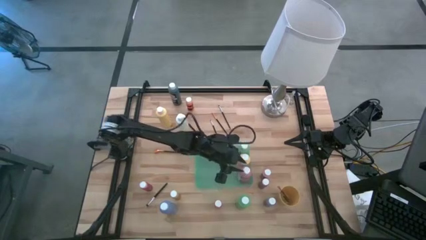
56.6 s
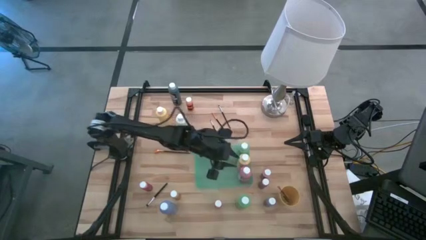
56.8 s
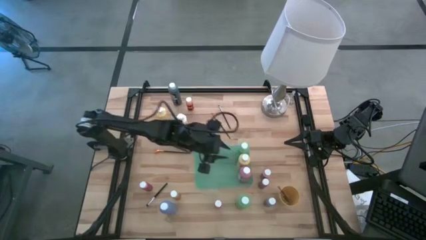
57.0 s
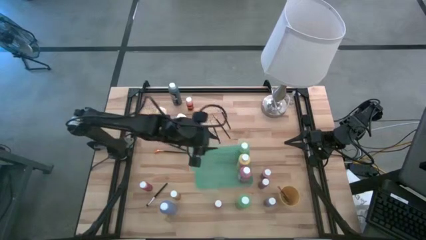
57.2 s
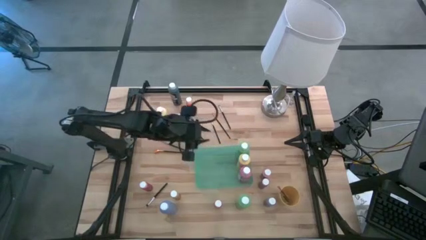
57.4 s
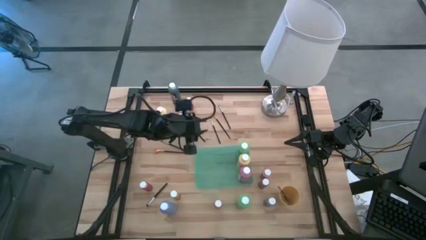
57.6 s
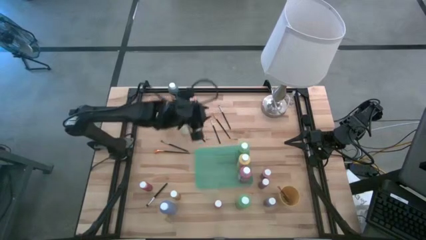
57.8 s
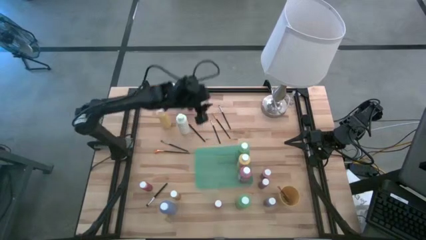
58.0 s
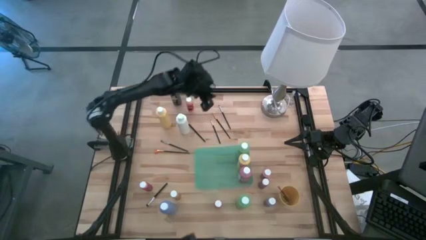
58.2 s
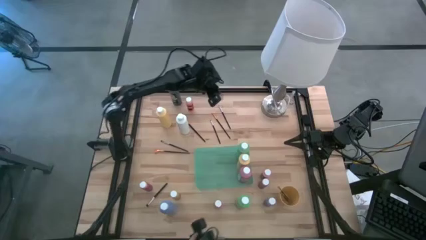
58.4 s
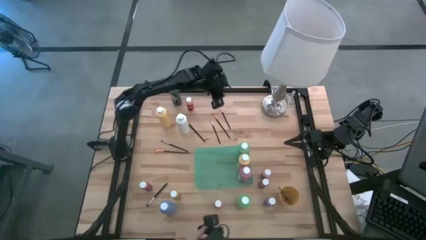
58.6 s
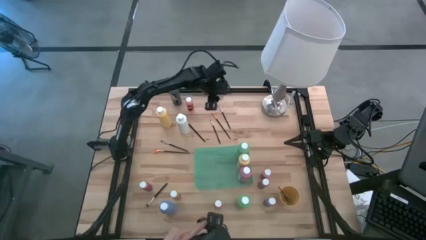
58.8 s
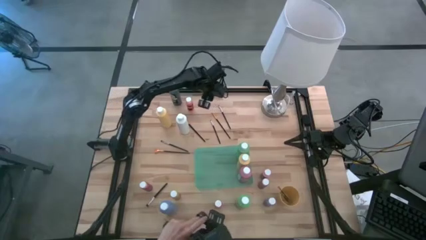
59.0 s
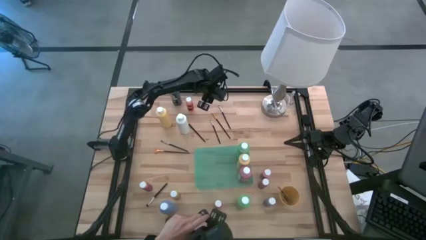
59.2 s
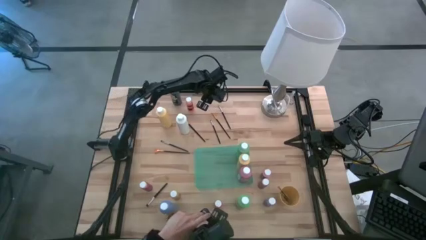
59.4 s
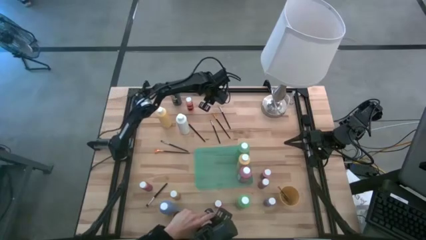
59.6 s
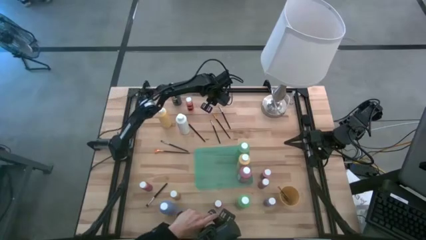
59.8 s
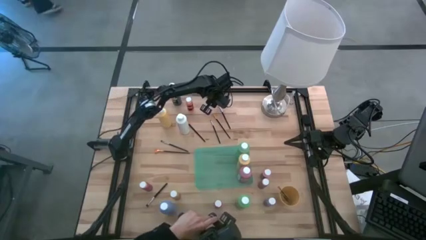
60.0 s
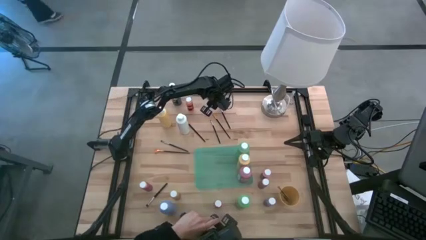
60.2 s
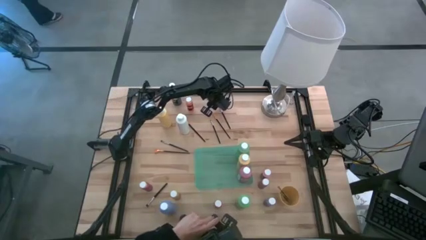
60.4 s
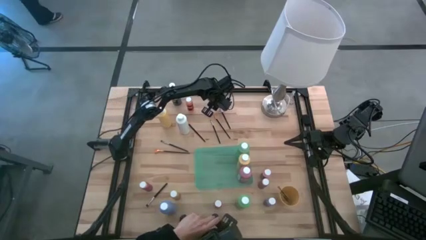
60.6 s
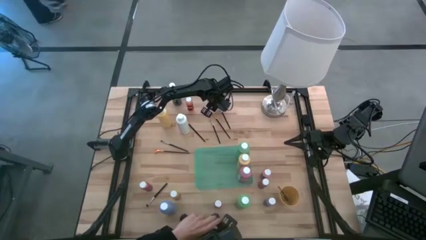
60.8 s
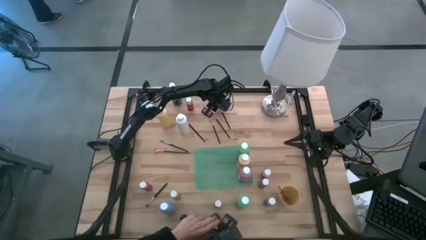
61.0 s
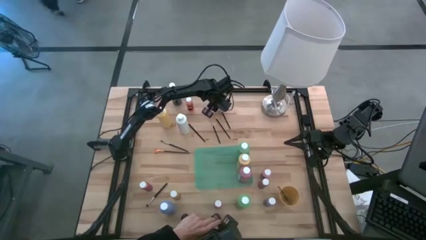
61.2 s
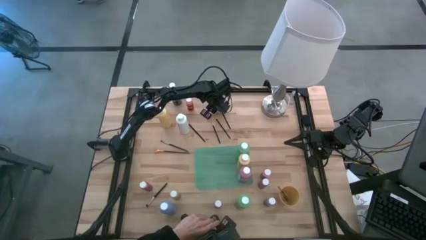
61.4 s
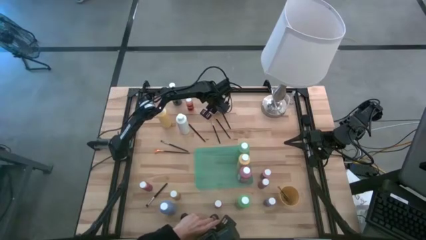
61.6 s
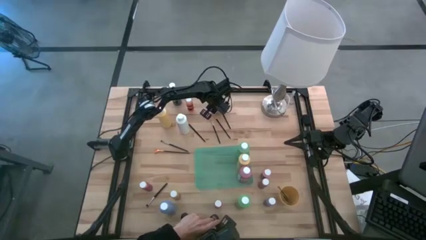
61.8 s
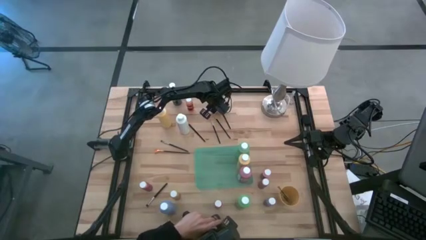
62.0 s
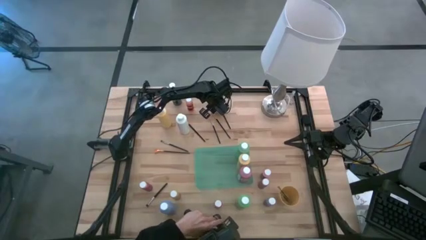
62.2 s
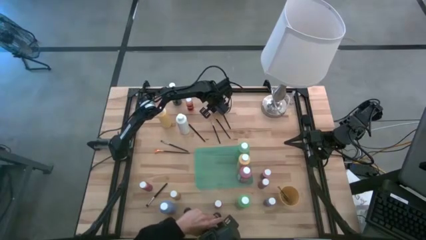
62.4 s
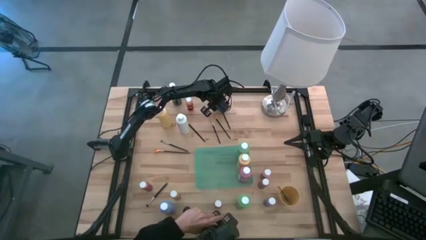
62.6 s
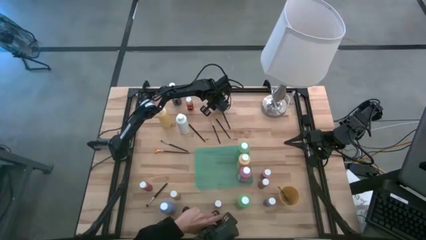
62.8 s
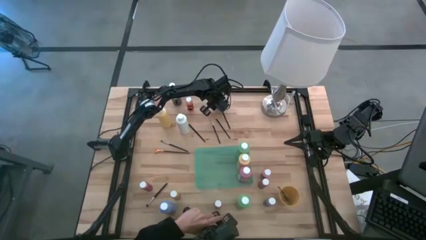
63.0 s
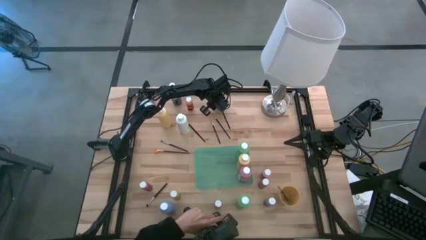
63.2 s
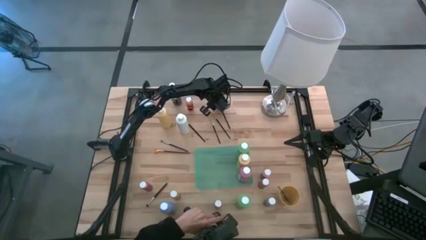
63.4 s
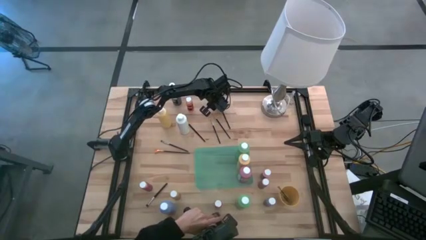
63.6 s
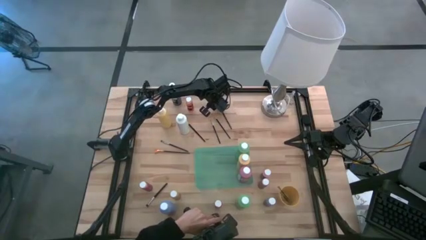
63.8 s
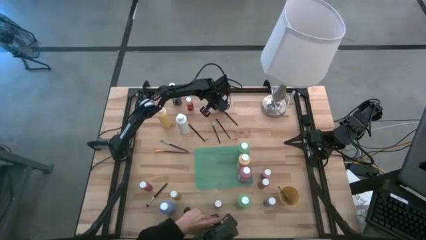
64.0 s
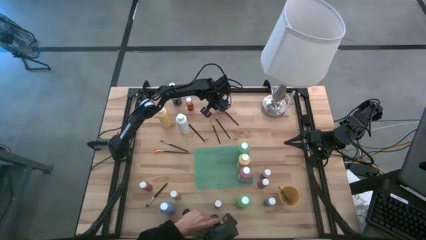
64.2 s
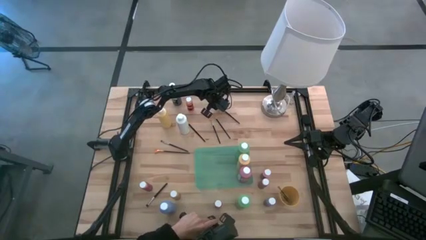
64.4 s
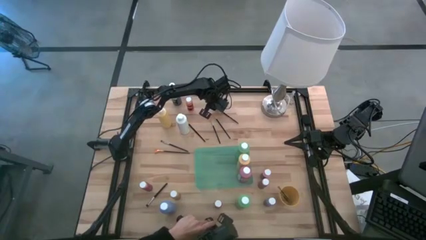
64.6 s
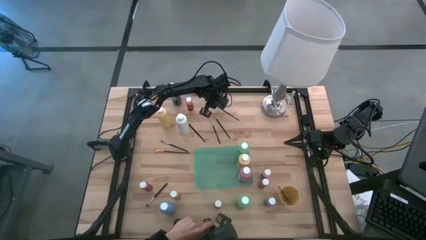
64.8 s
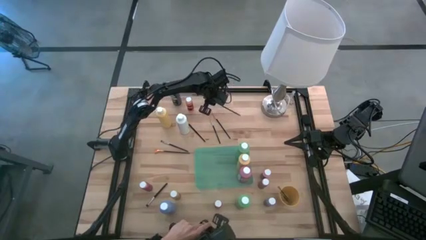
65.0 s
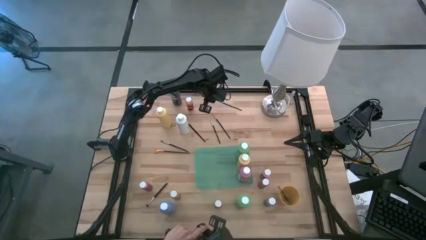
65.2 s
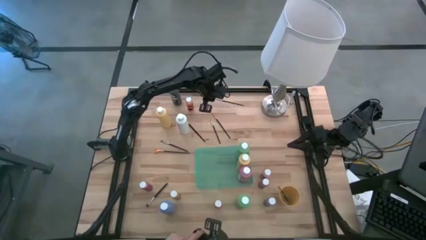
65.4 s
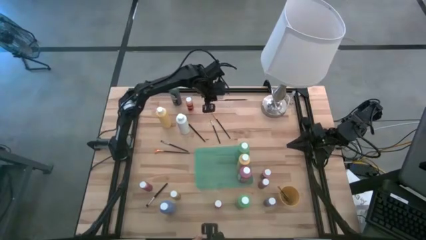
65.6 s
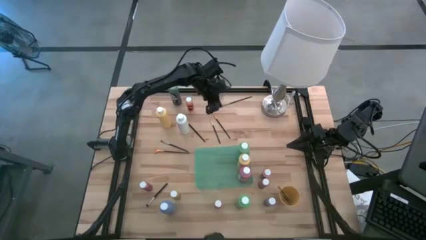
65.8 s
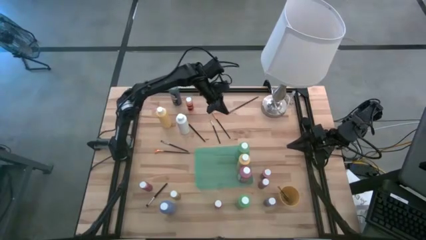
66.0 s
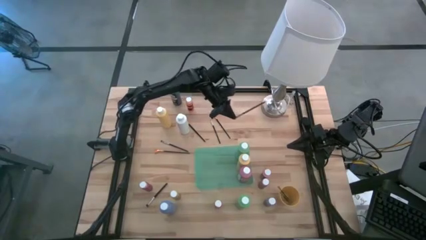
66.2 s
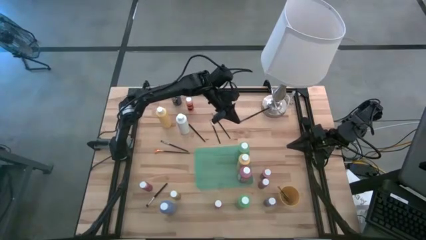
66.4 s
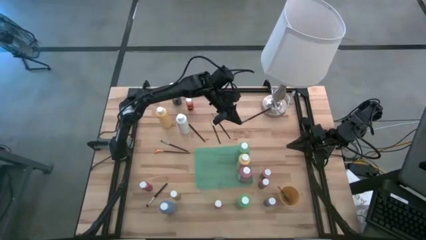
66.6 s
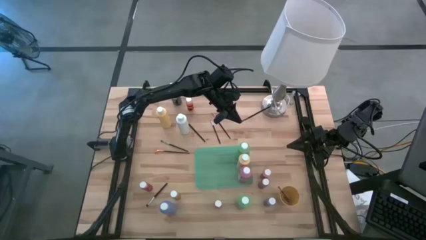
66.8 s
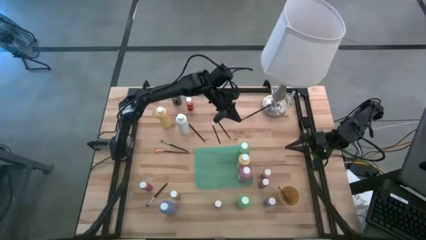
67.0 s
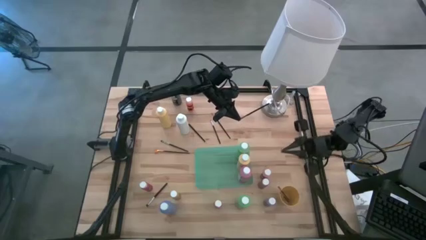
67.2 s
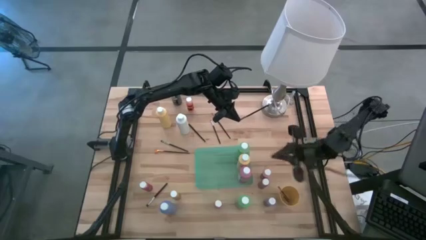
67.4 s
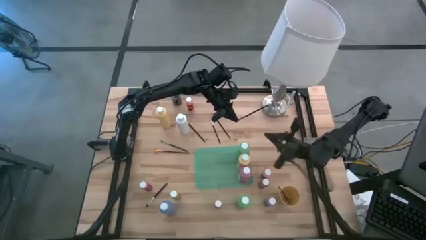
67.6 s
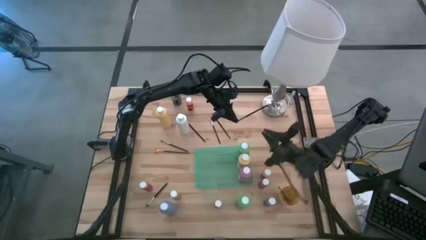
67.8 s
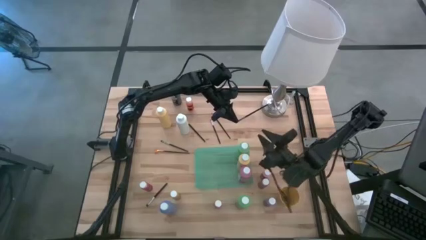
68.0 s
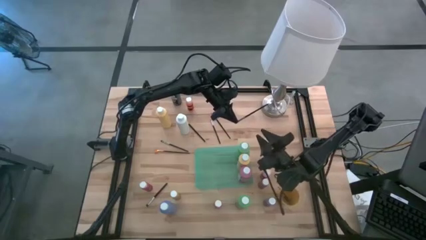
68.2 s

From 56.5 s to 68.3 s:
Task: Pick & Place Paint Supplies
Put the silver paintbrush into the yellow cup
